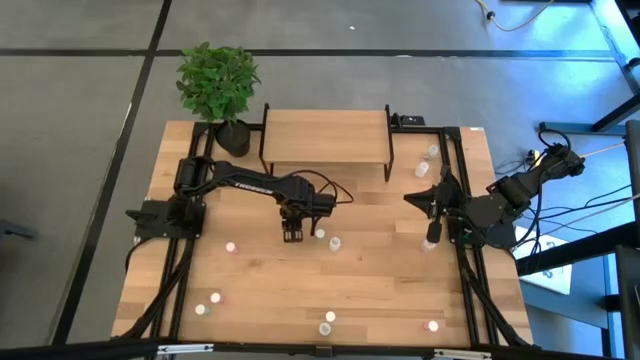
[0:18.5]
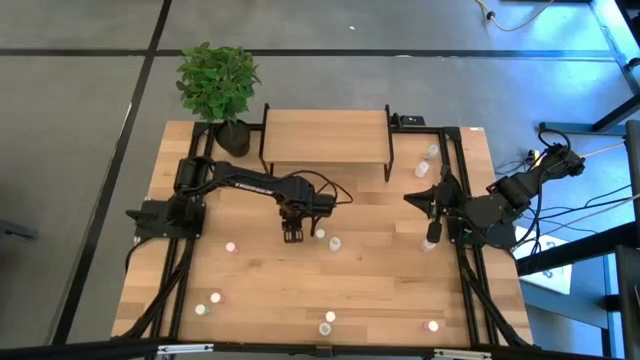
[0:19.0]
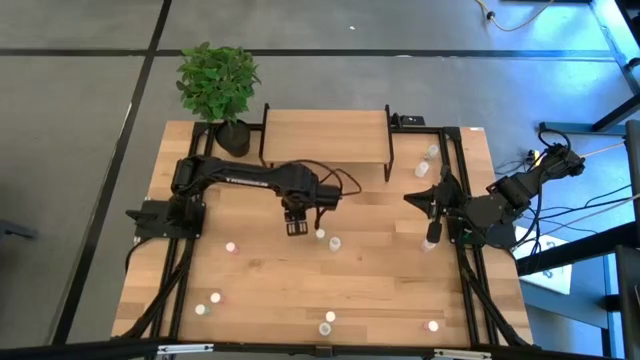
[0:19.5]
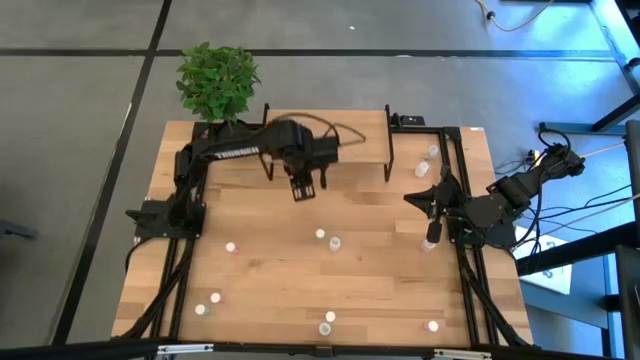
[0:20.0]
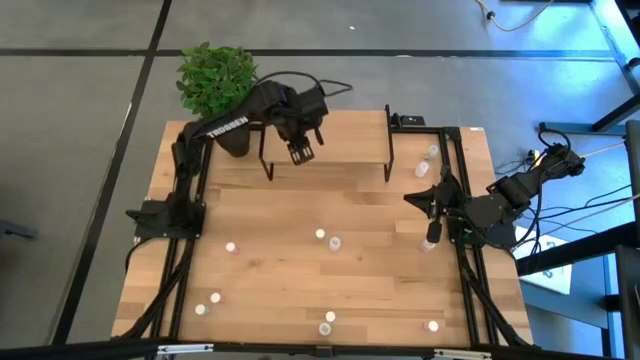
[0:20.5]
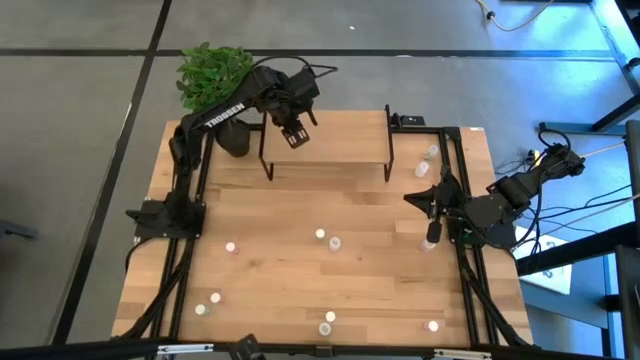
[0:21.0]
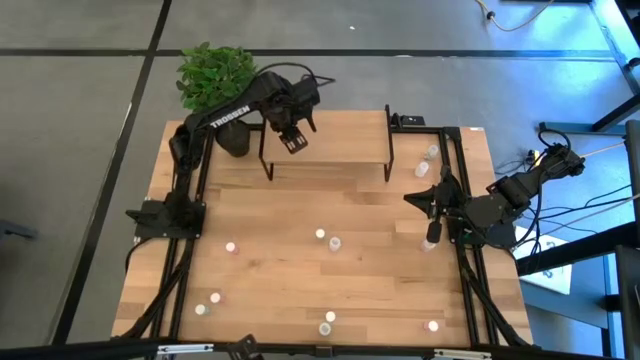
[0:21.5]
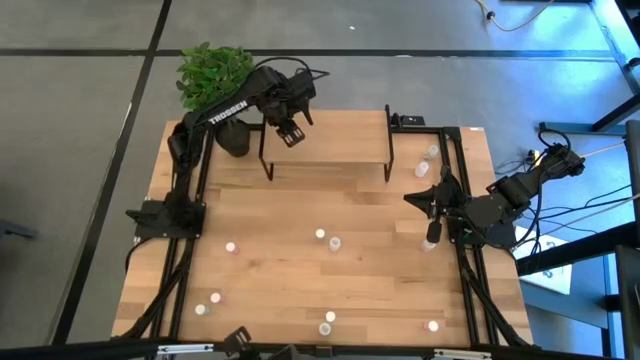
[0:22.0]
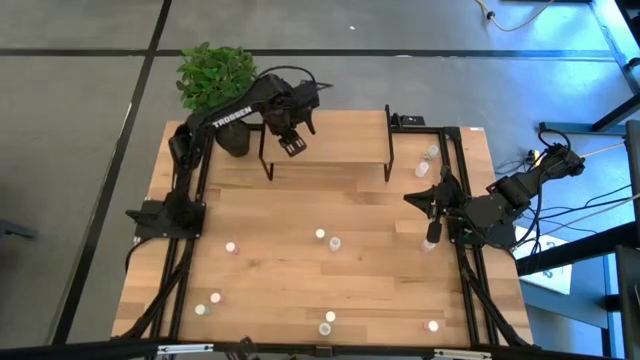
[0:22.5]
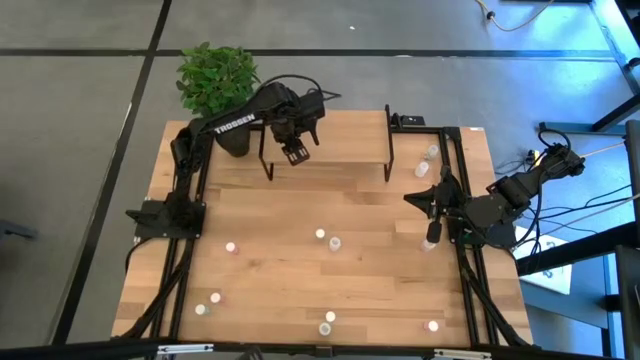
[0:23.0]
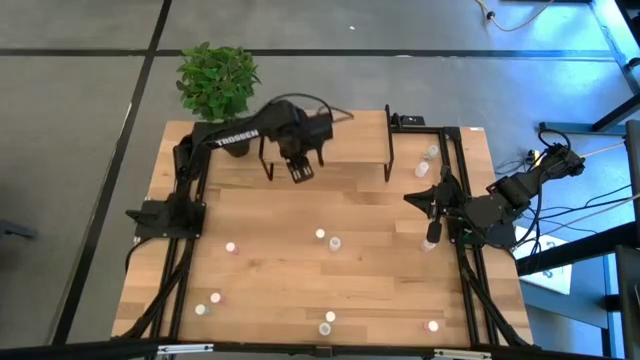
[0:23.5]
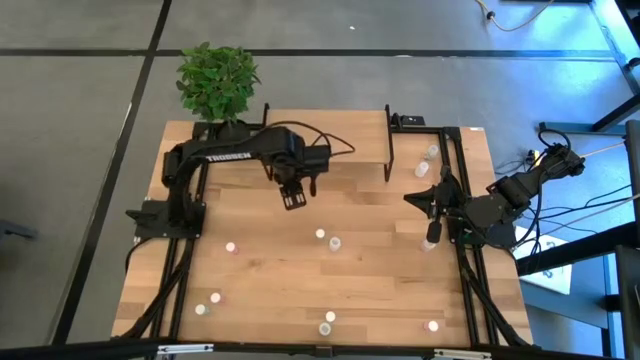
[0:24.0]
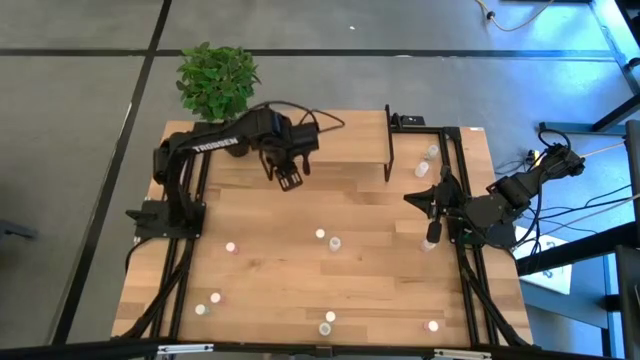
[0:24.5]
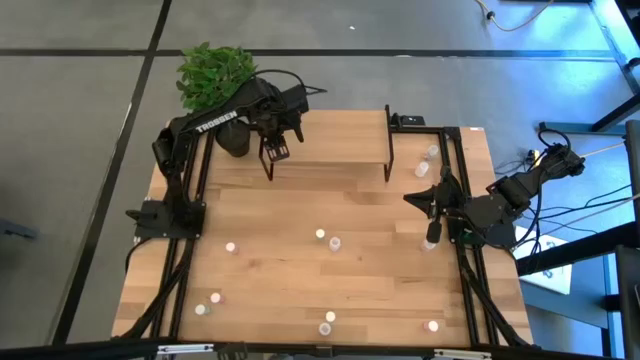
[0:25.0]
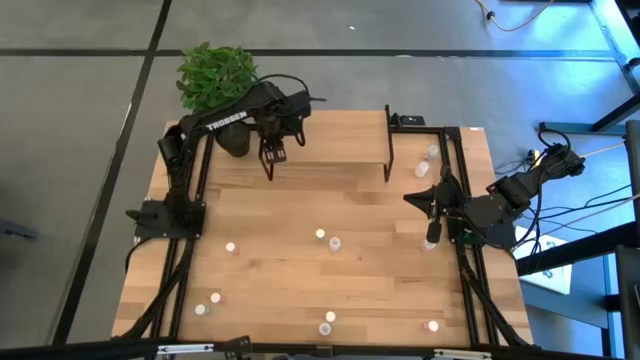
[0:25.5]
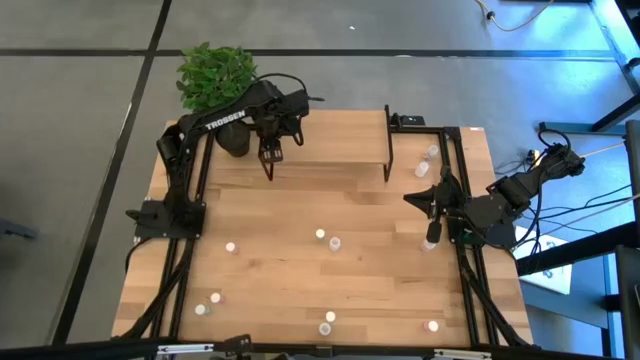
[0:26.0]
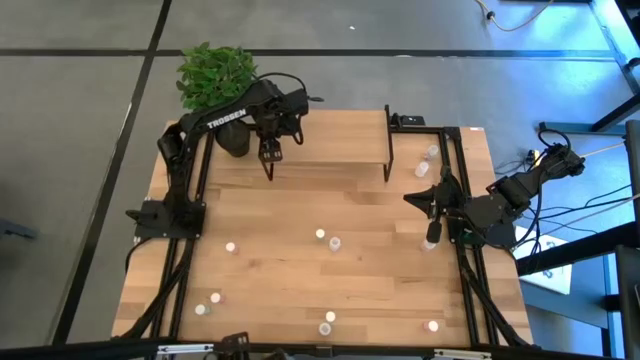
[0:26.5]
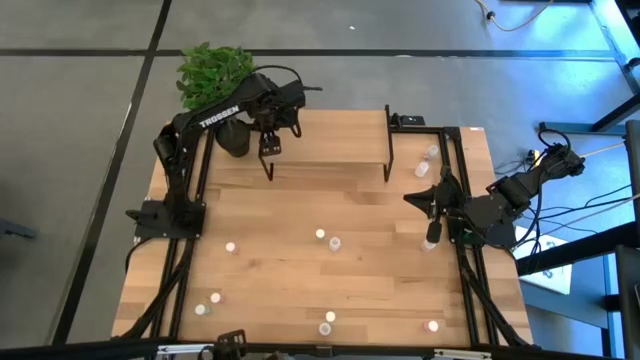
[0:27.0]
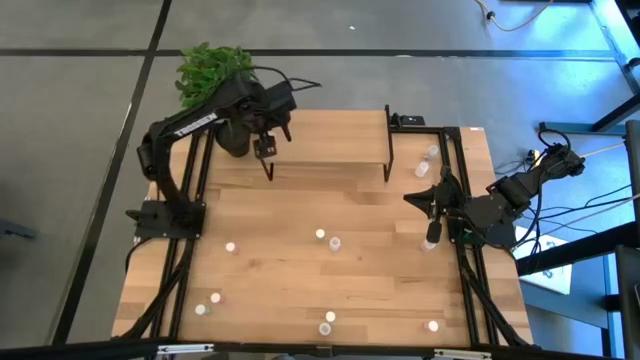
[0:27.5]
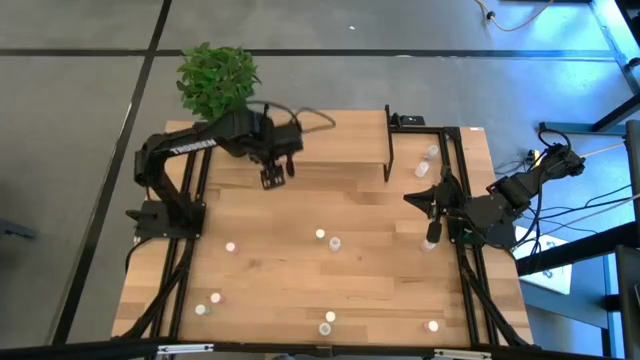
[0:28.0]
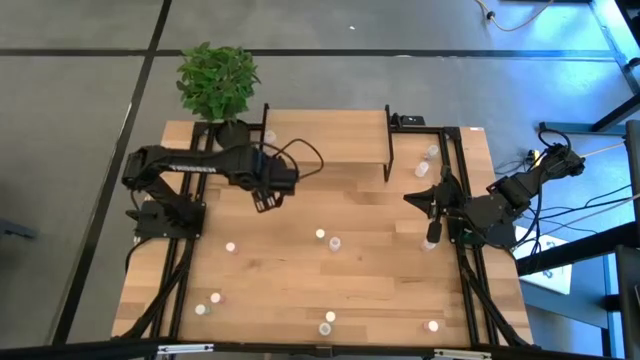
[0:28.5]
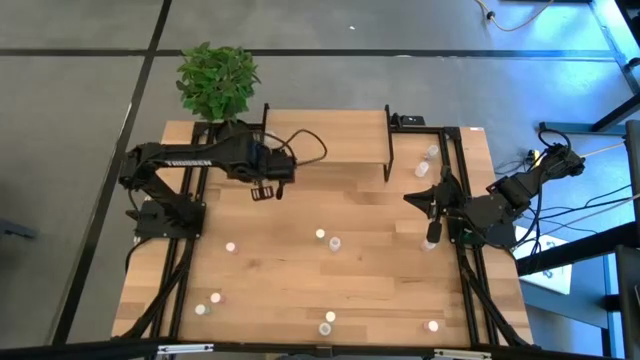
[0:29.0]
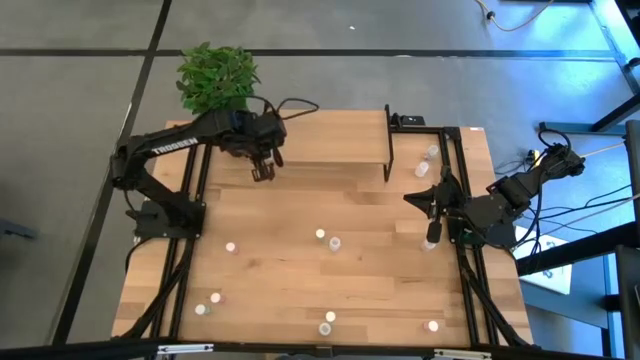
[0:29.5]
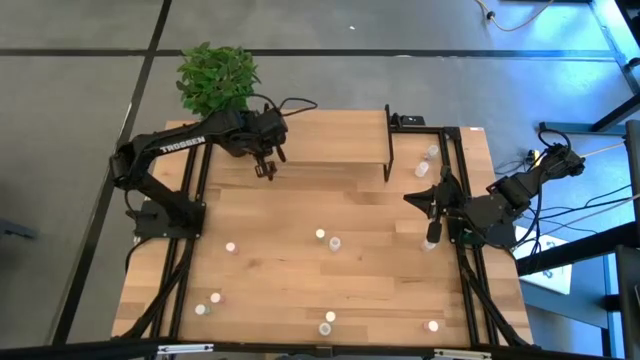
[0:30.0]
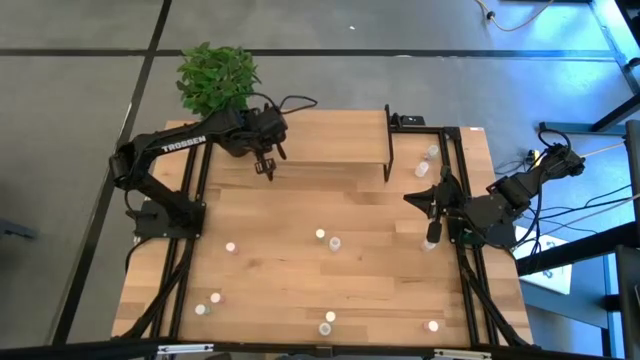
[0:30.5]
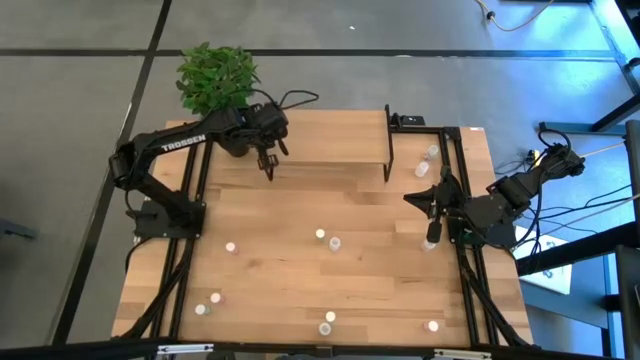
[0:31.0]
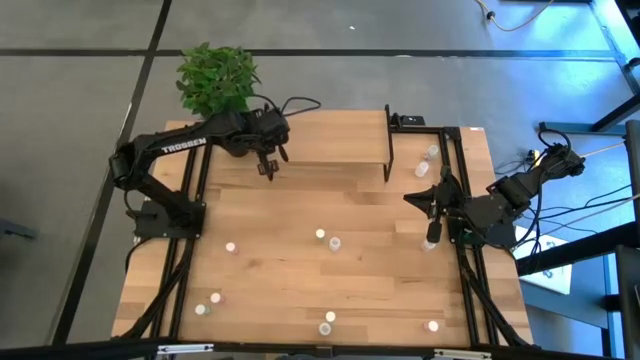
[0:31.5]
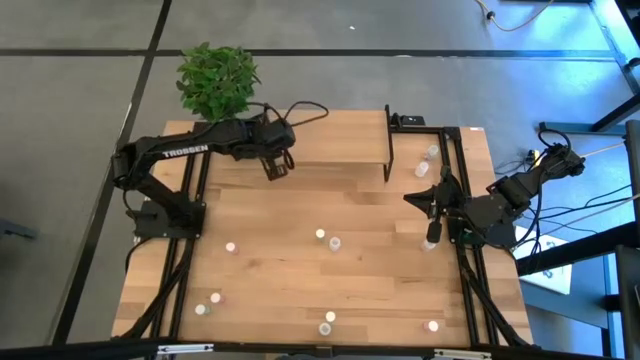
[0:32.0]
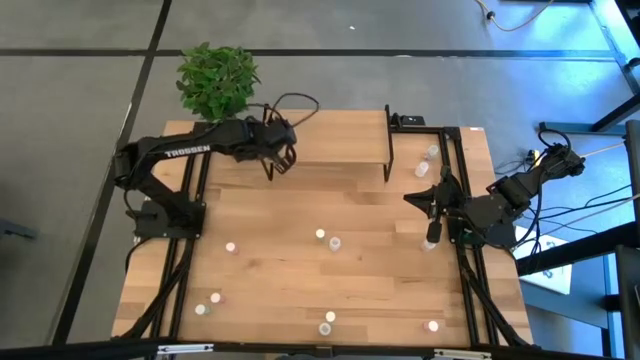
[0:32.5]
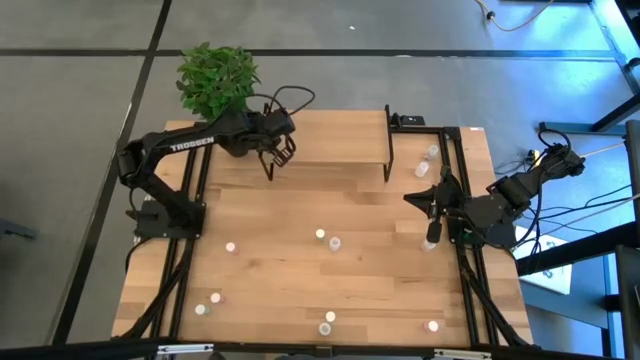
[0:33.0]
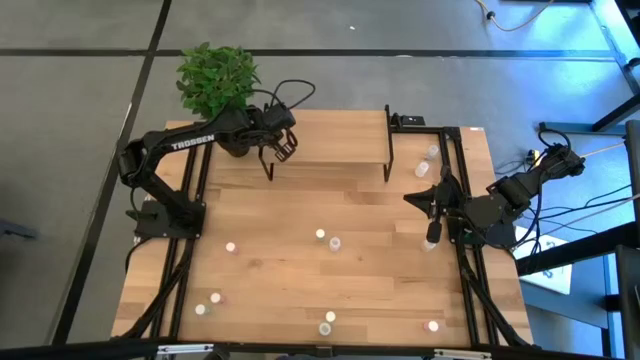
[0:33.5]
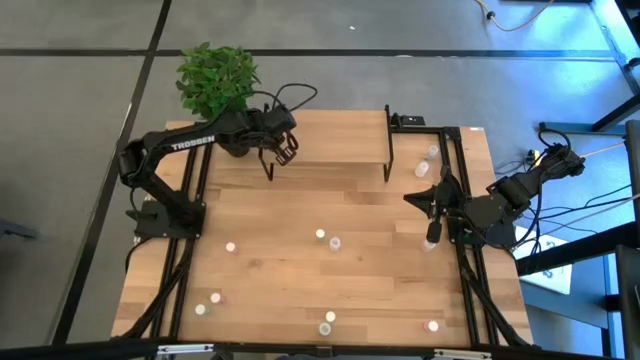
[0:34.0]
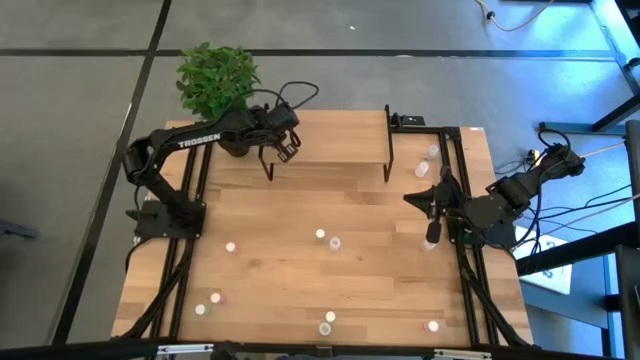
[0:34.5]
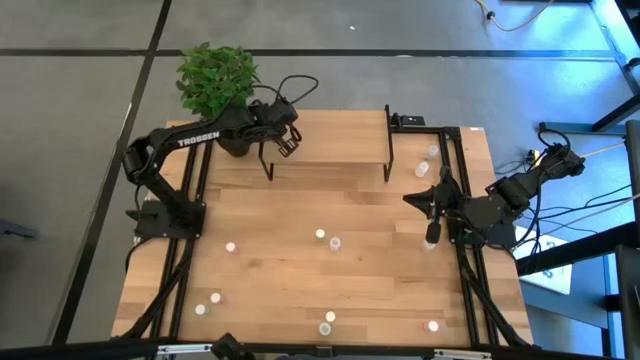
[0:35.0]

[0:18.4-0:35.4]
Task: Pick and place medicine bottles onto shelf by color
Put the middle left transparent pill bottle on the shelf
